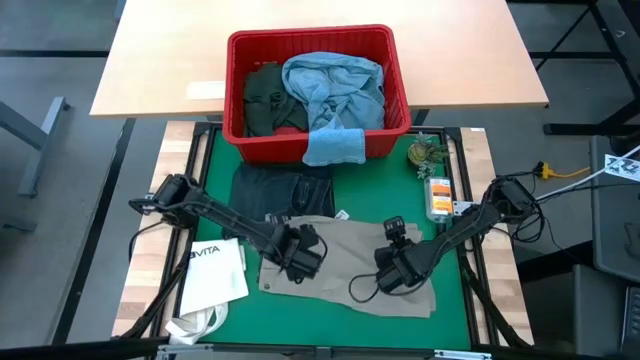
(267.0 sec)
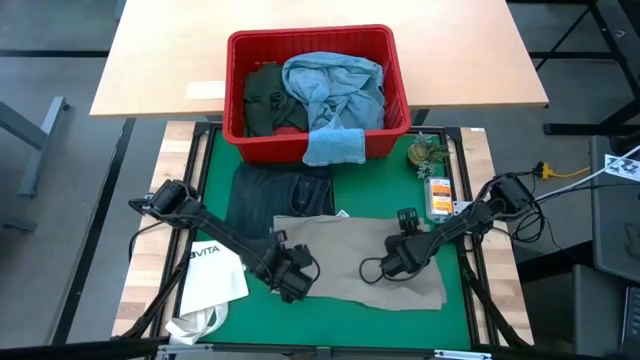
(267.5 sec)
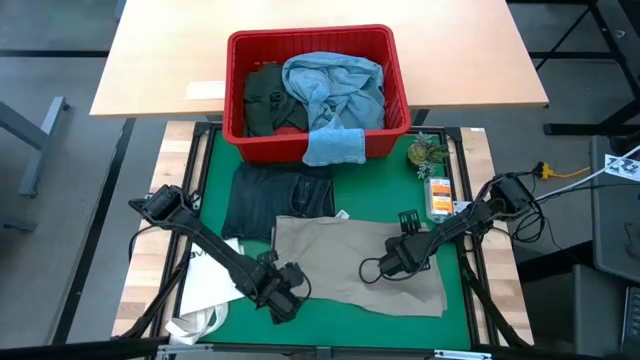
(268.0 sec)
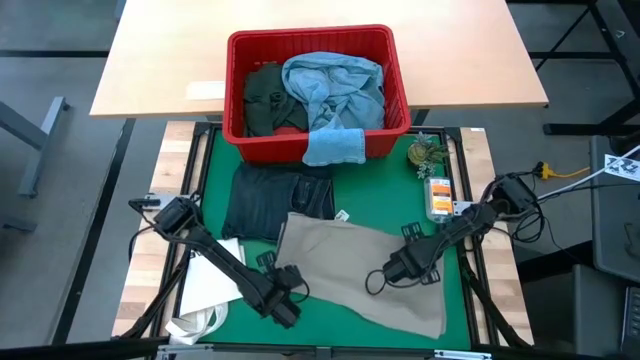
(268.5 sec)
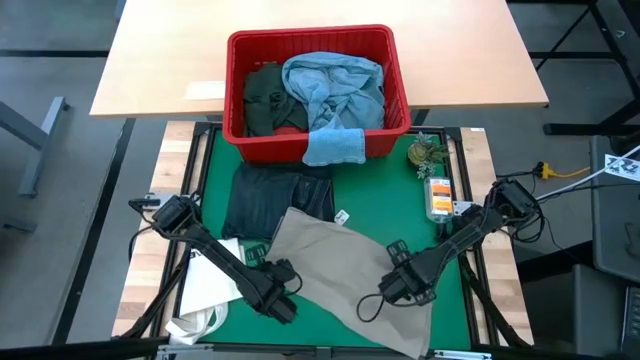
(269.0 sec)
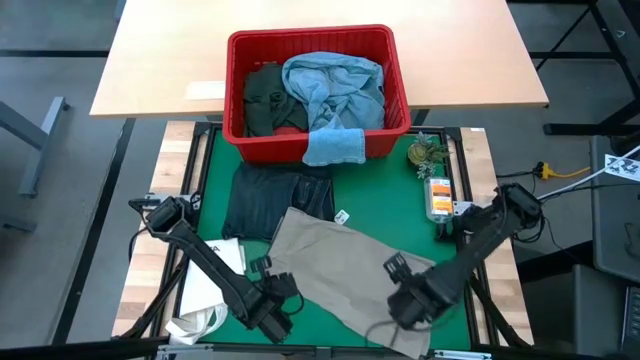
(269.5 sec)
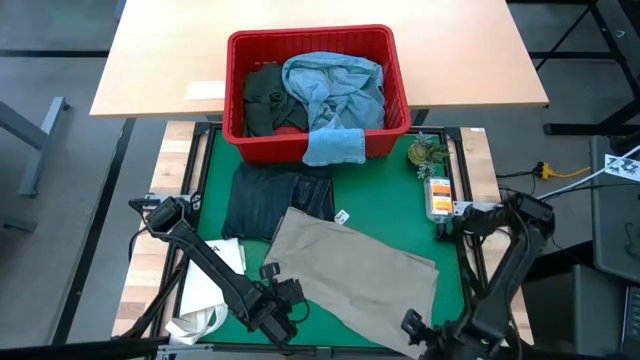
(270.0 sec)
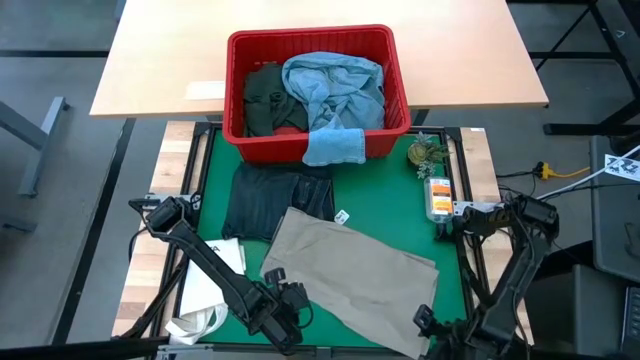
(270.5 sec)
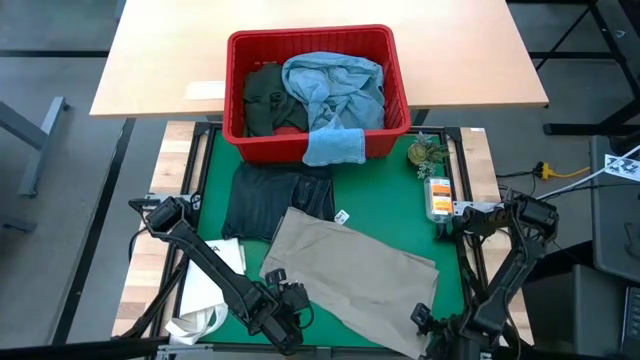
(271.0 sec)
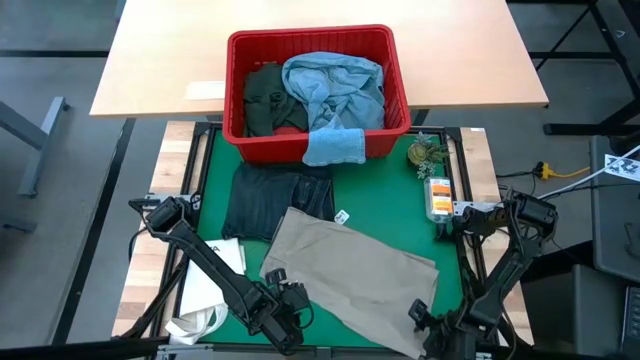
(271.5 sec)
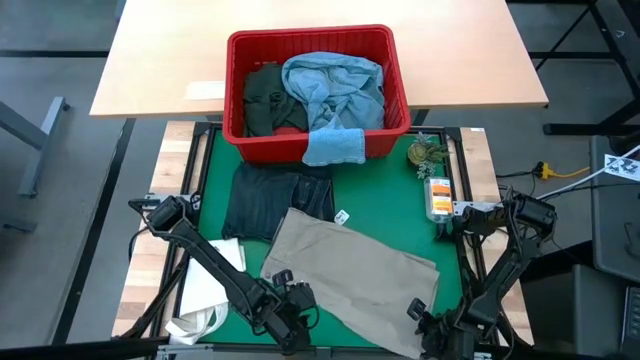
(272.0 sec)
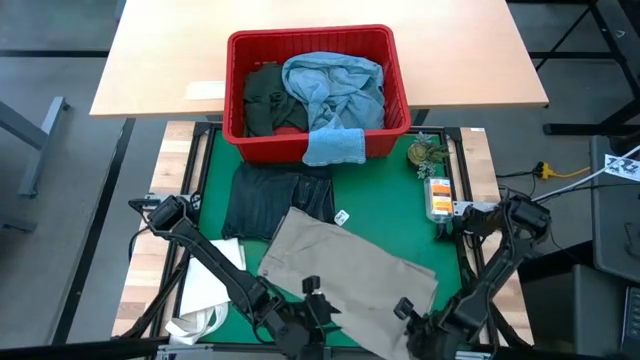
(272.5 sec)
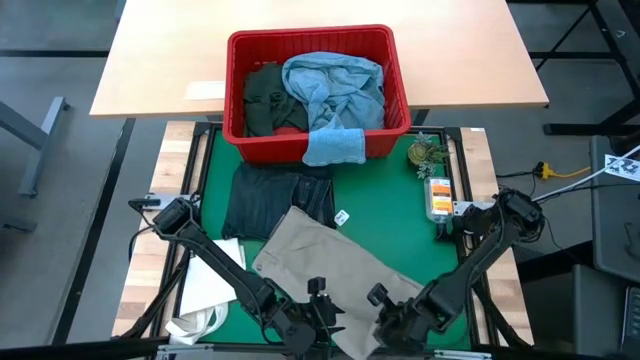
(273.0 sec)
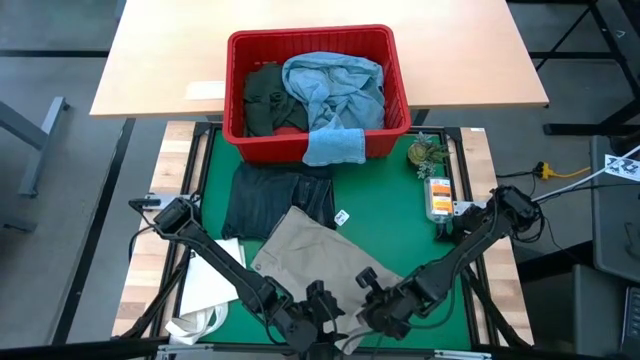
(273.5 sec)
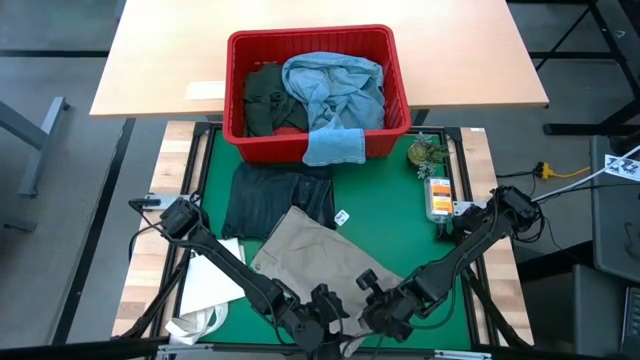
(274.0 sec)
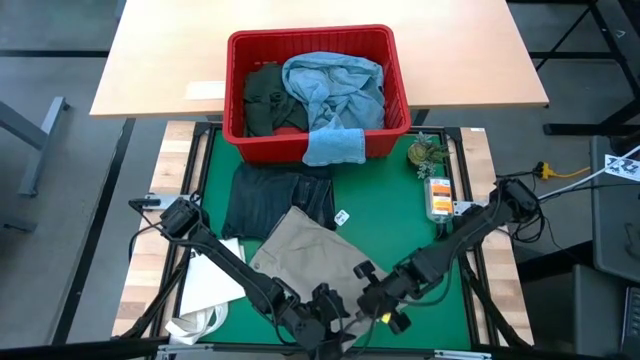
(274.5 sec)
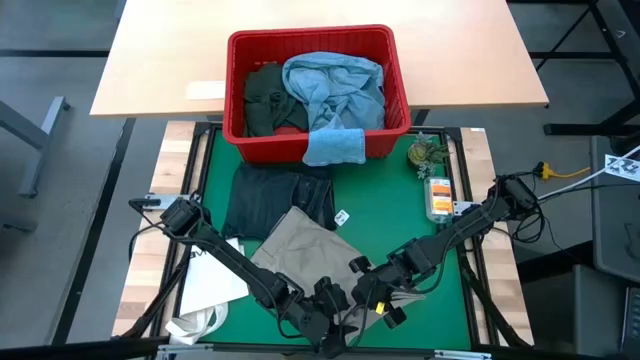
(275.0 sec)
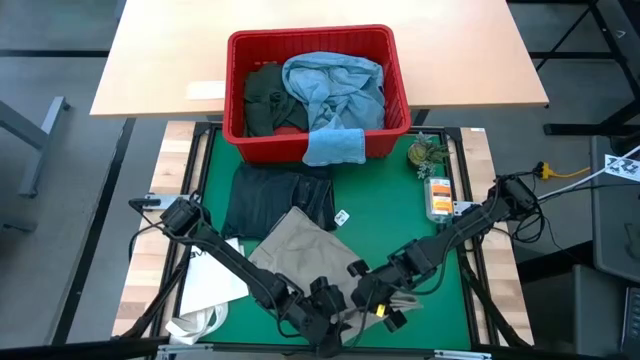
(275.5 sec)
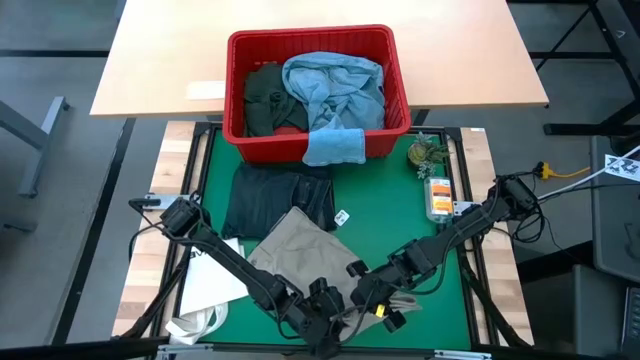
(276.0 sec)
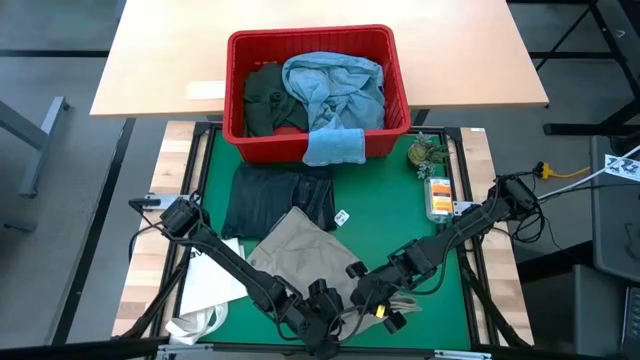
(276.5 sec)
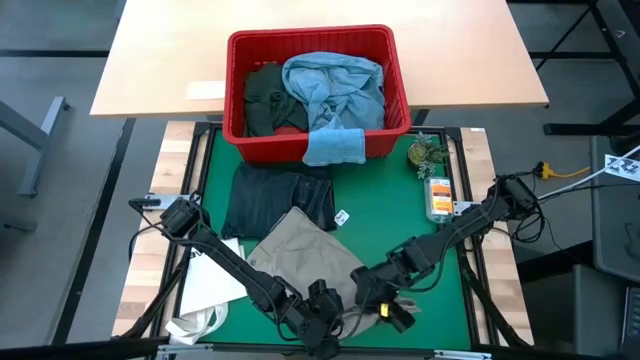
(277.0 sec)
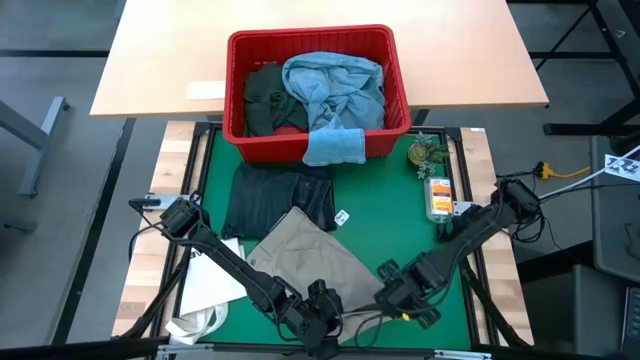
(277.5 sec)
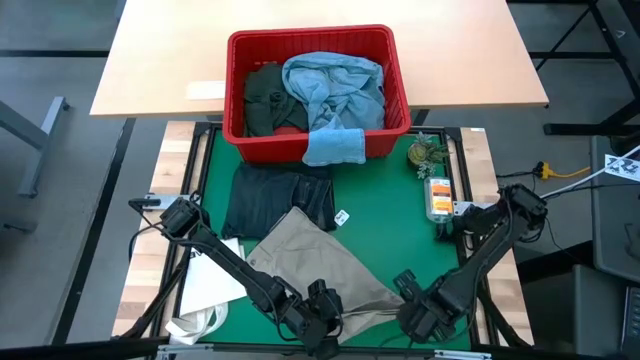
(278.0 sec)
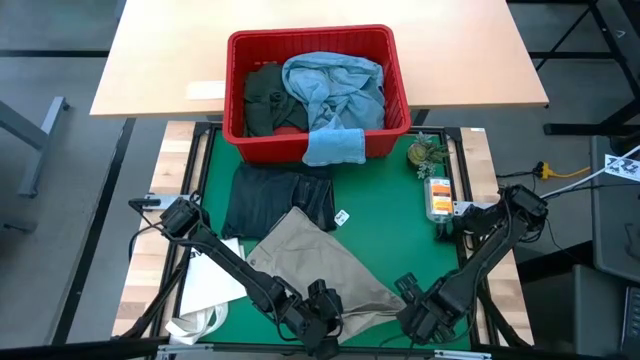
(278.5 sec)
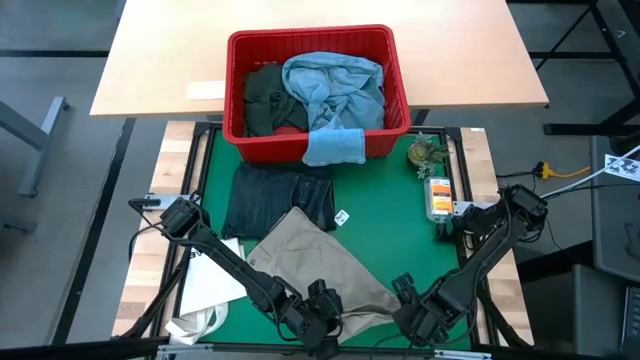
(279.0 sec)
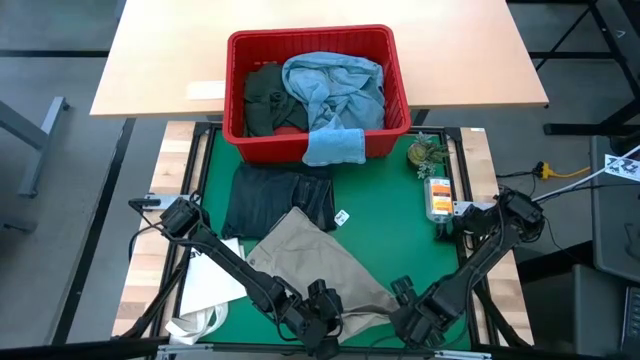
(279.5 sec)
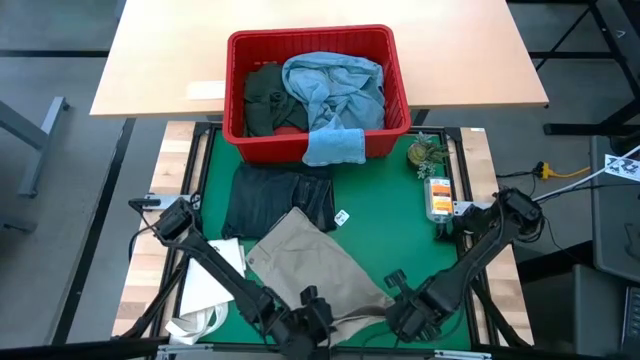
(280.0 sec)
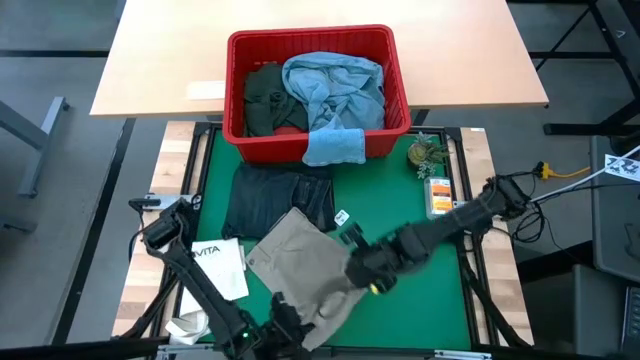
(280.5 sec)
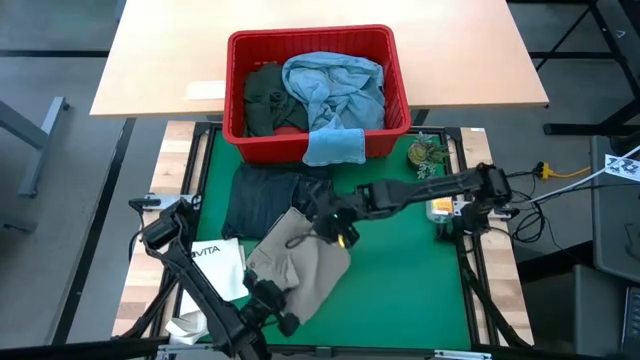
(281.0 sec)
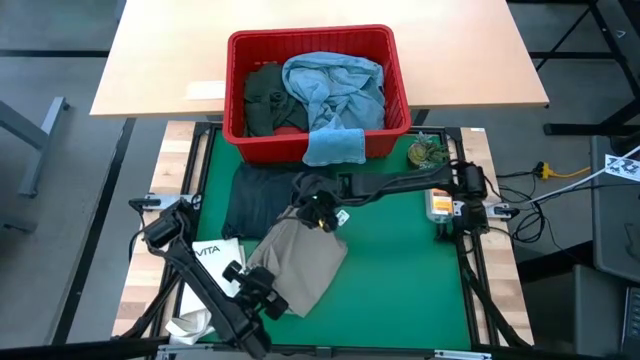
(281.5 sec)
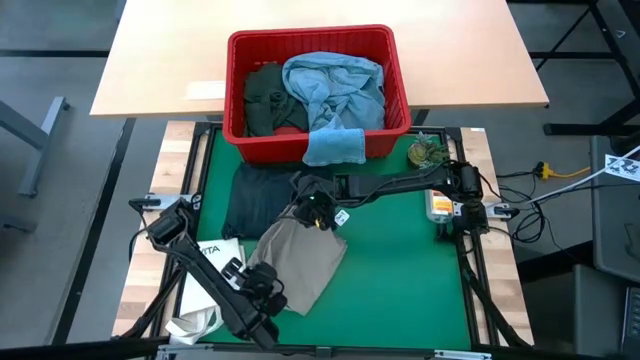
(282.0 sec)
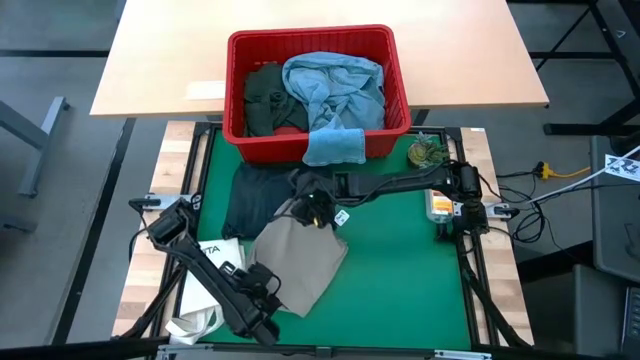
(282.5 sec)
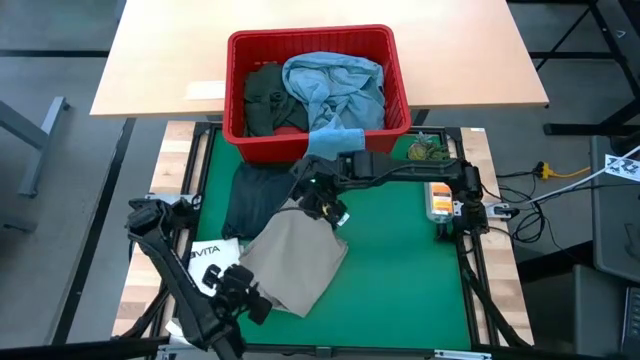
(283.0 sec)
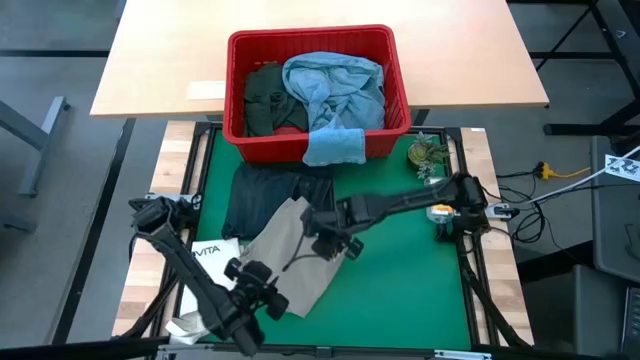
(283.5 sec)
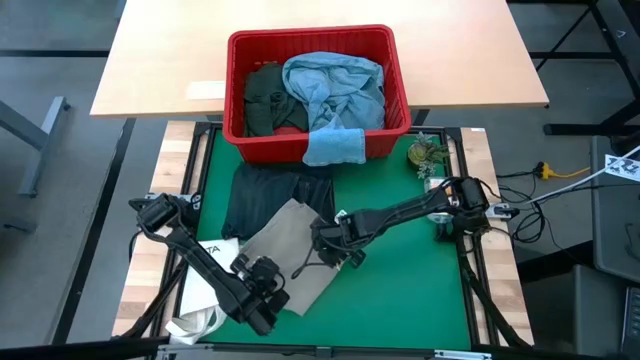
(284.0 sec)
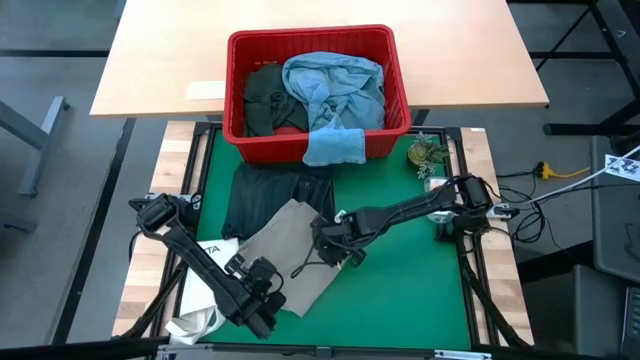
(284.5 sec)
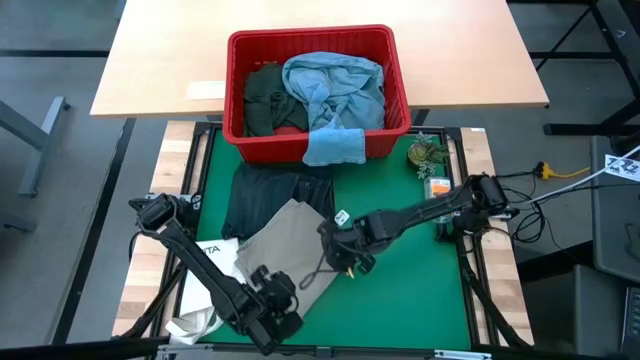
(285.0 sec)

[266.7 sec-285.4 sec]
Task: Fold Laundry from Bin
Fold the brown shorts

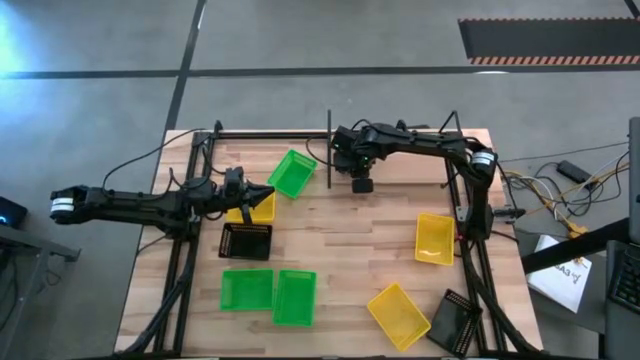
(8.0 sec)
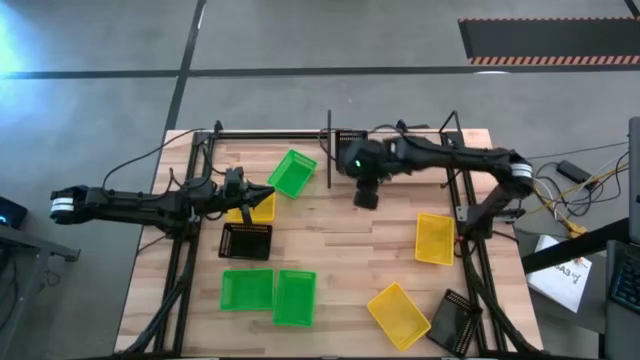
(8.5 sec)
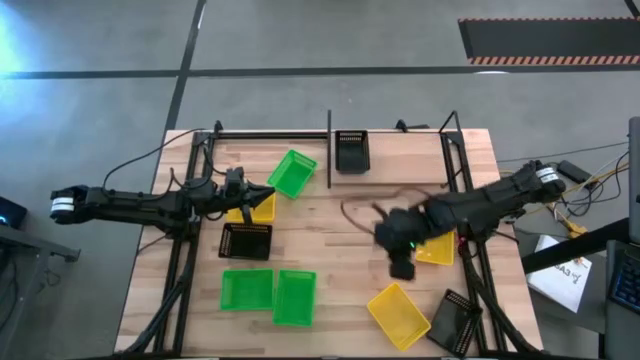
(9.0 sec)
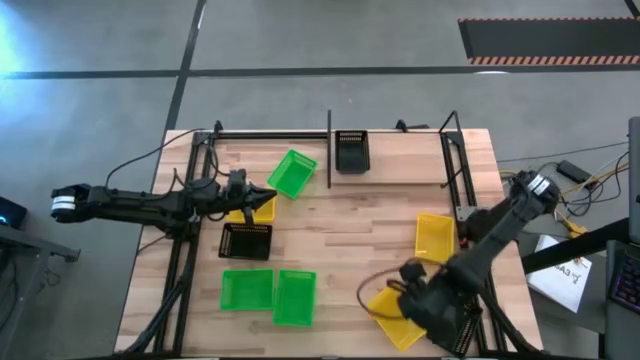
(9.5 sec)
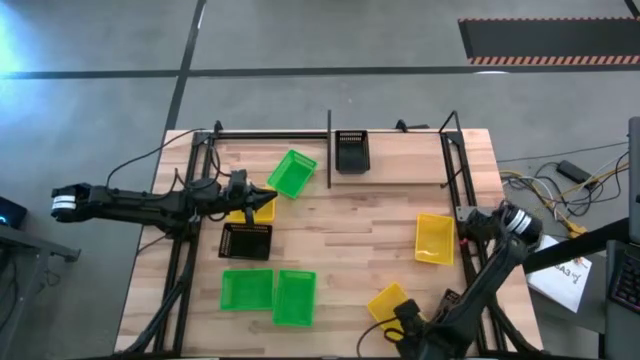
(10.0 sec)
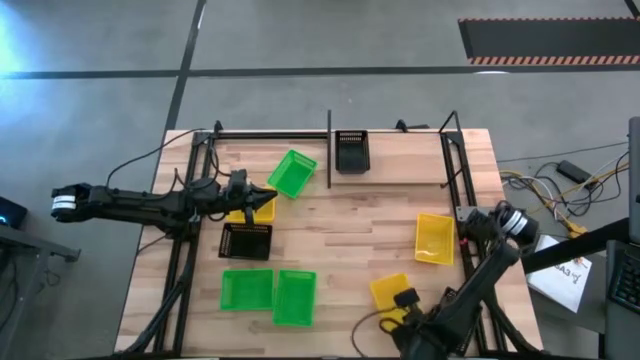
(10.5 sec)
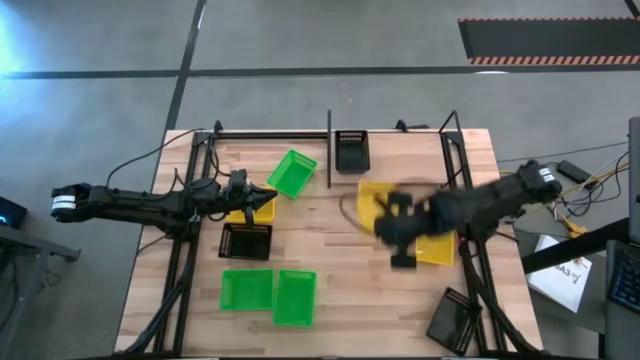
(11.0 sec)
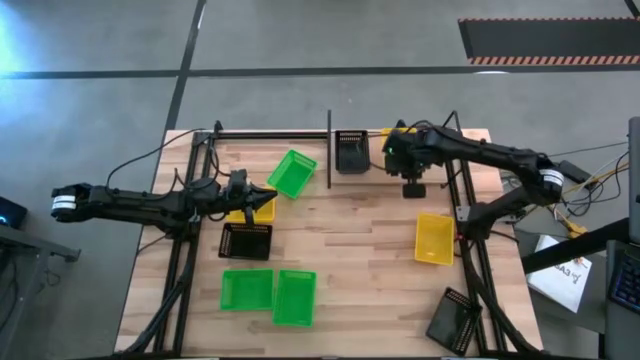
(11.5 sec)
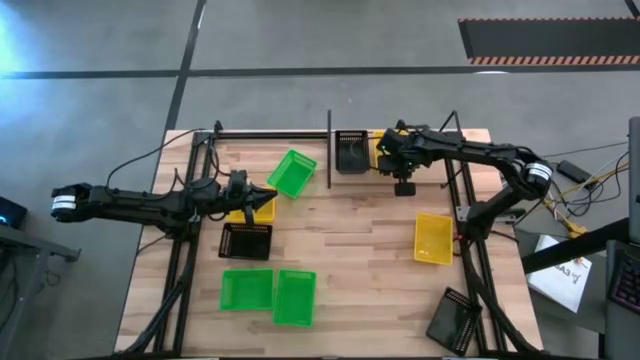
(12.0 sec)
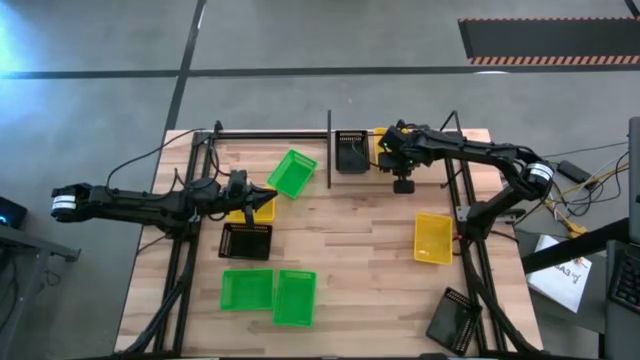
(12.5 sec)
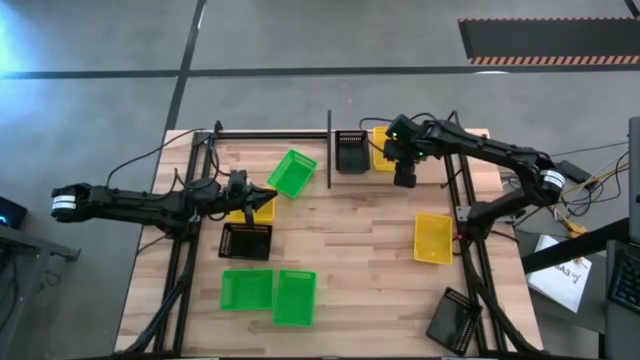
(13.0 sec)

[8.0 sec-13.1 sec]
Task: Stack baskets on shelf by color
Put the bottom right yellow bin on the shelf
